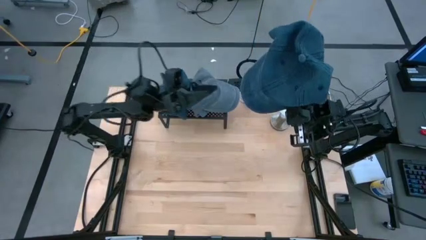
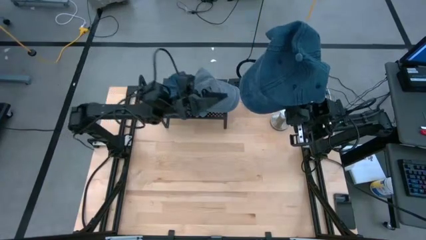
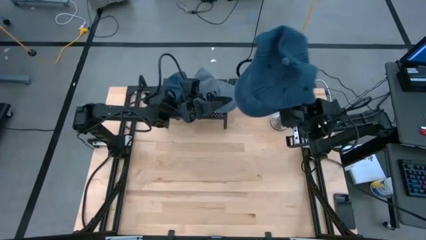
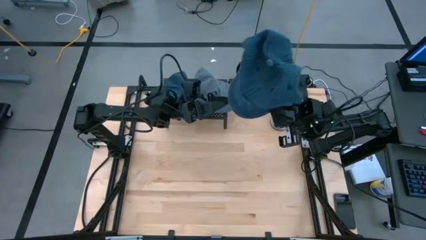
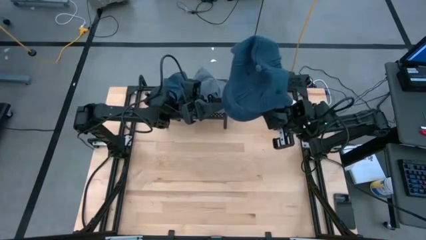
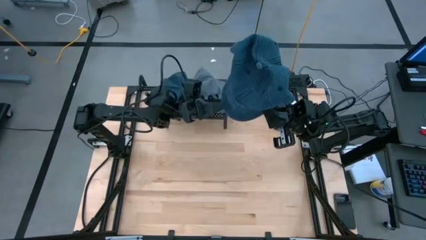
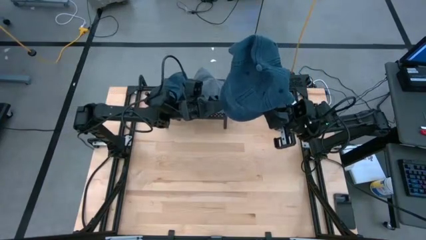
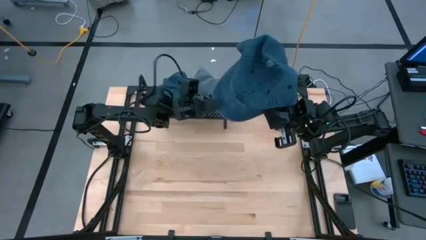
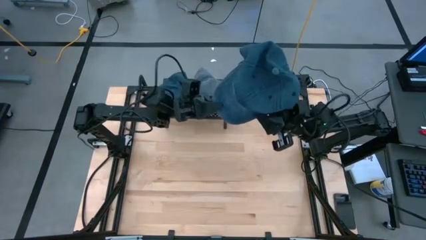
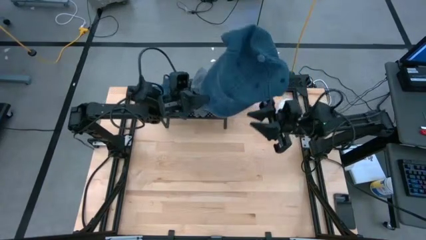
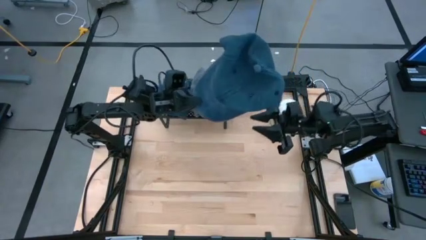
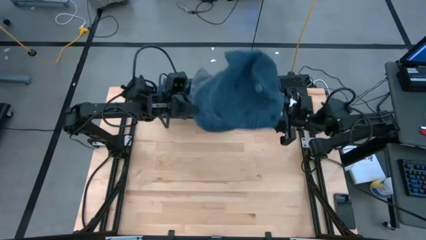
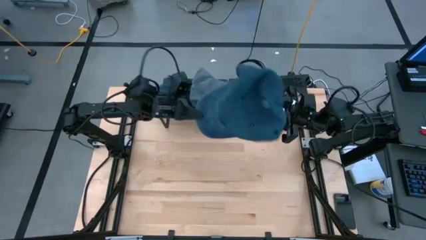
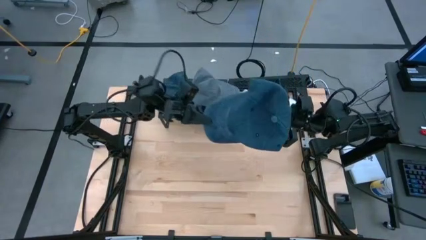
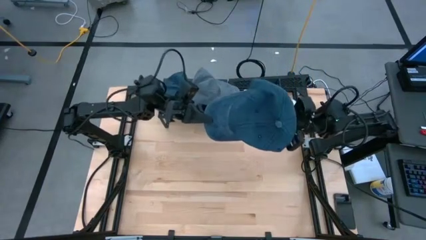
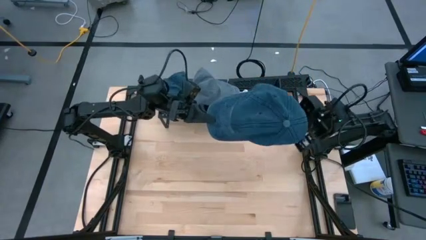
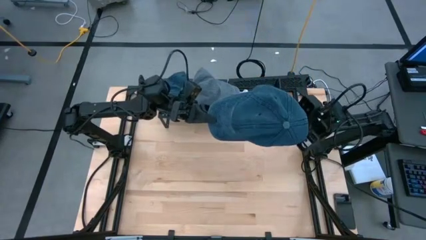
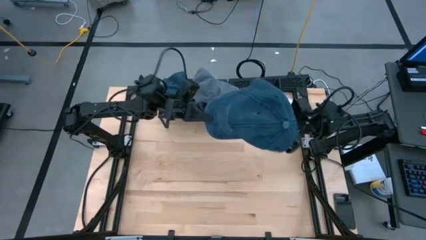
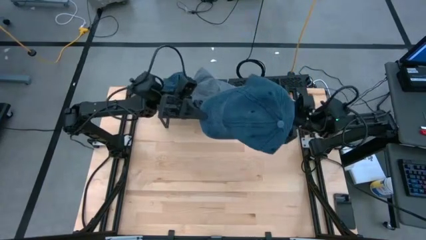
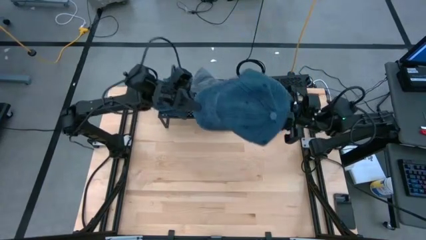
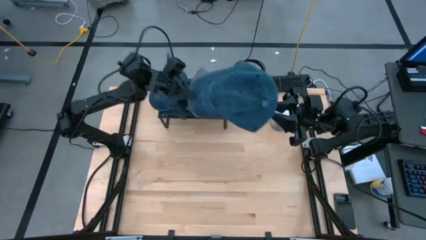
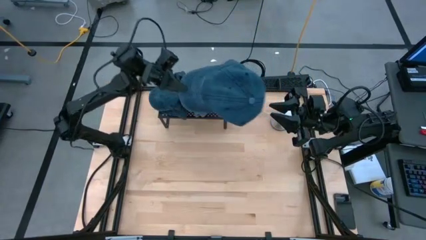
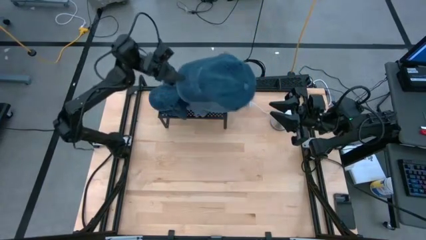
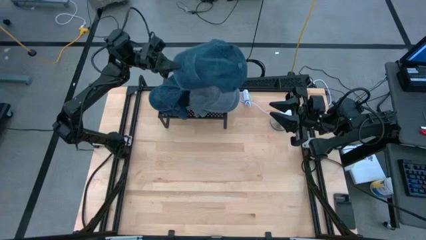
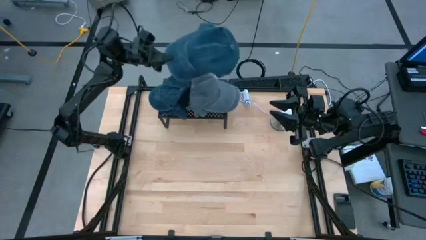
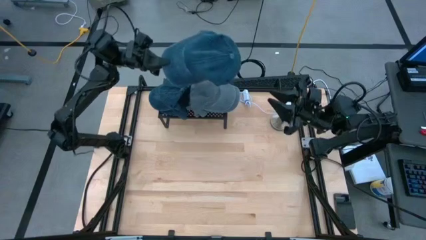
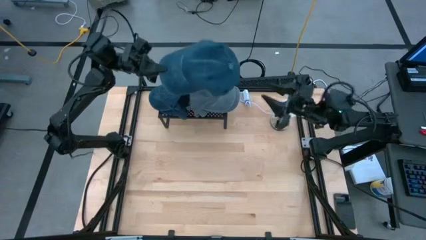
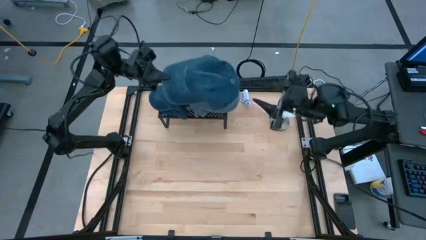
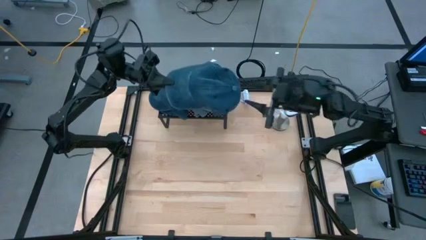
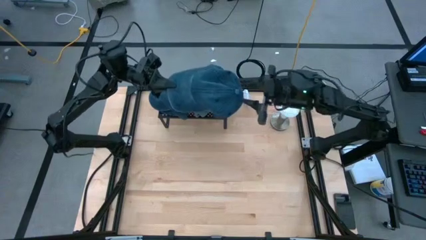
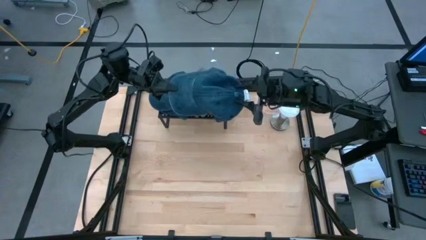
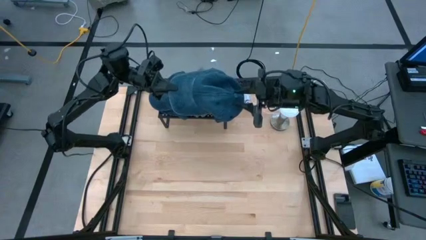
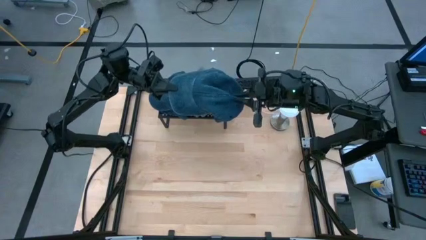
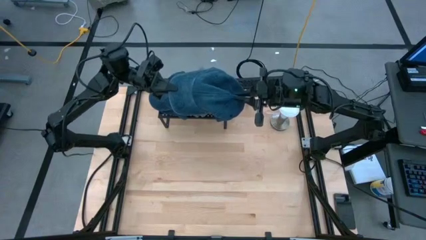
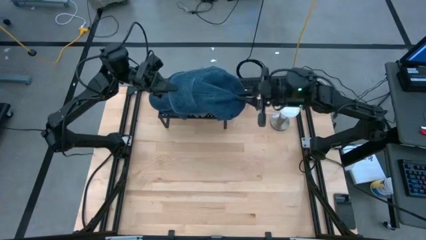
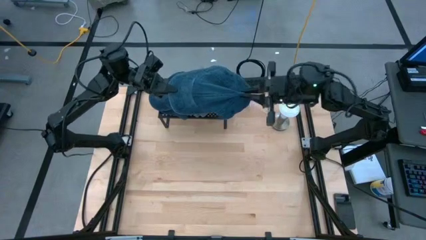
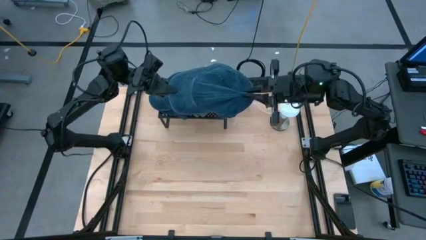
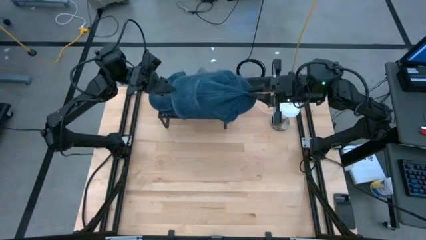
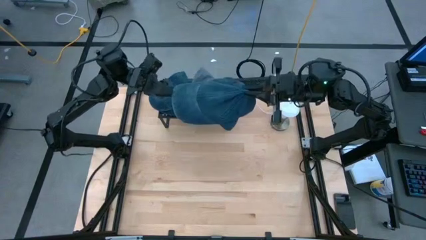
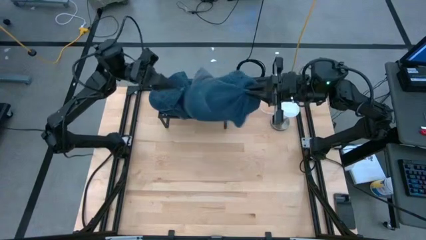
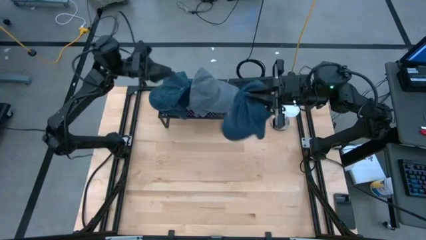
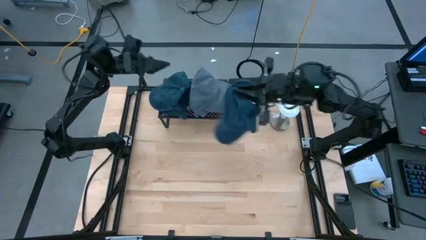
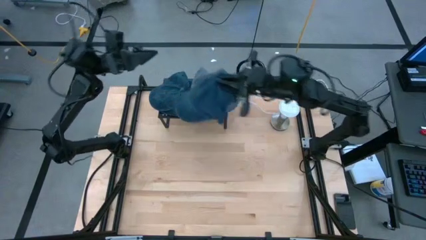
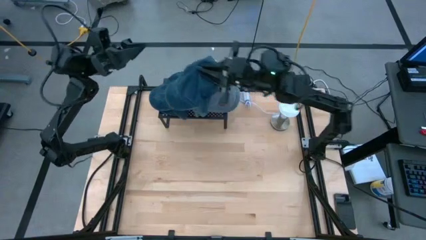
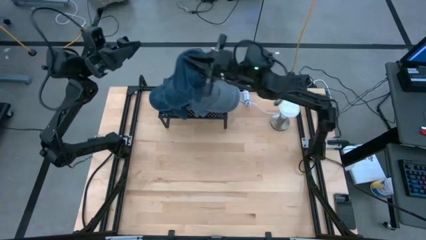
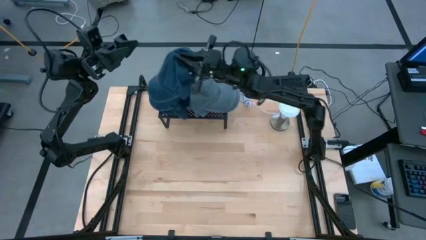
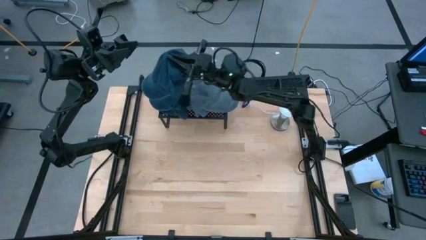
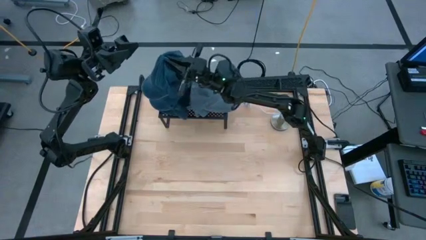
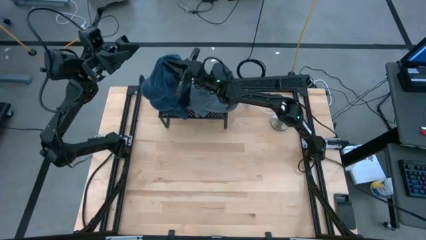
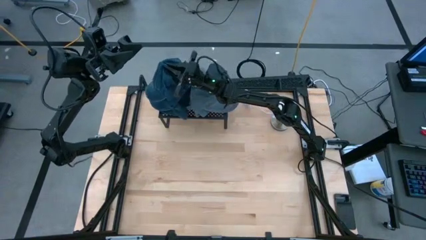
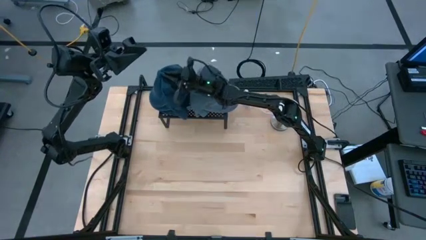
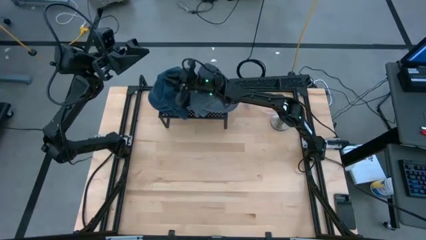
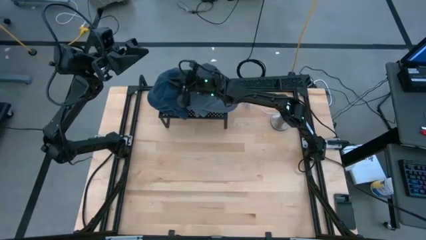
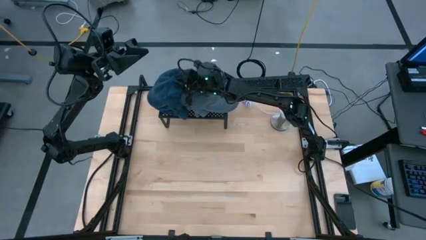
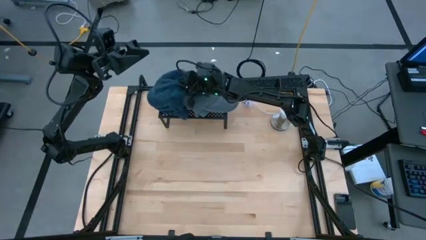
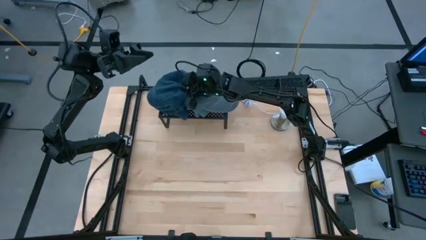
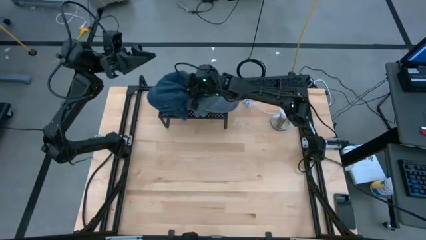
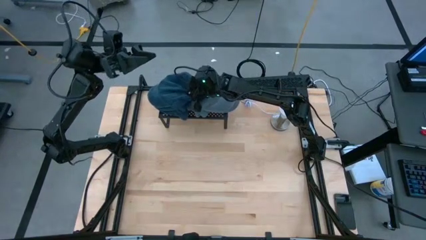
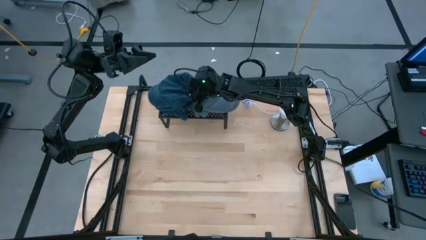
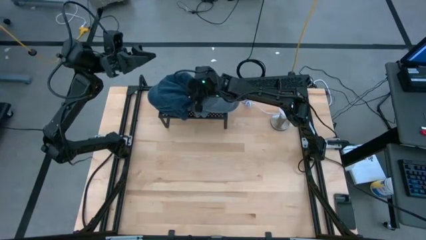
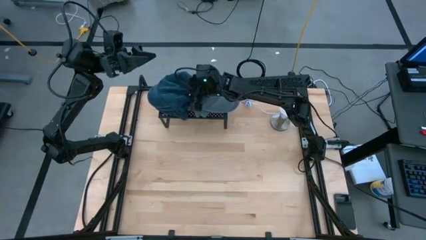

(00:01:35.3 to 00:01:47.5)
Task: Pick & Place hat
Stack the dark blue cap on top of the other dark blue cap on the shelf
